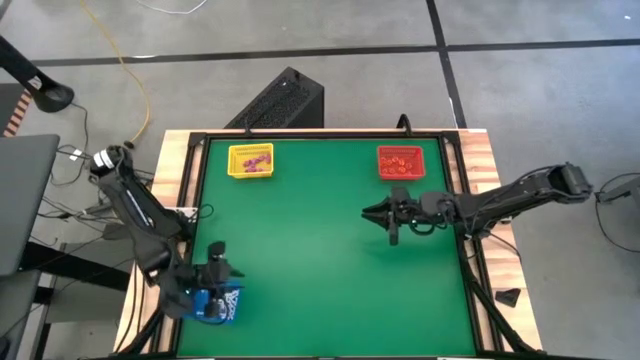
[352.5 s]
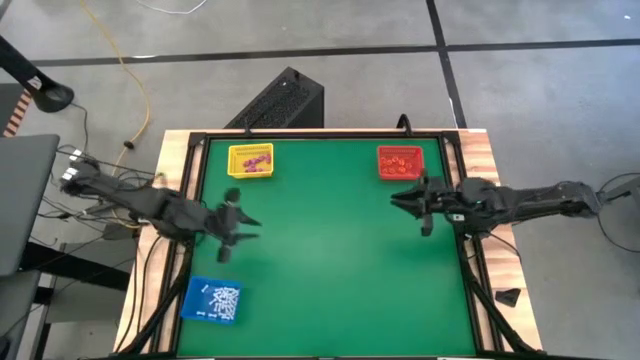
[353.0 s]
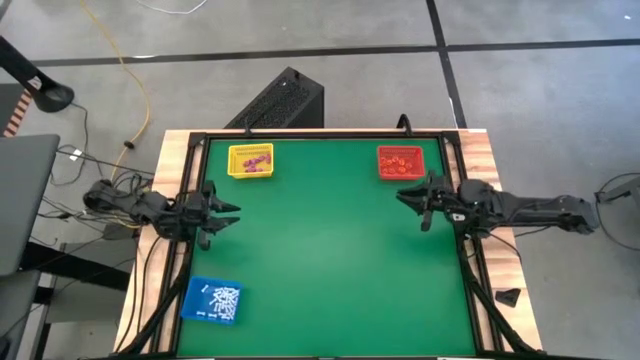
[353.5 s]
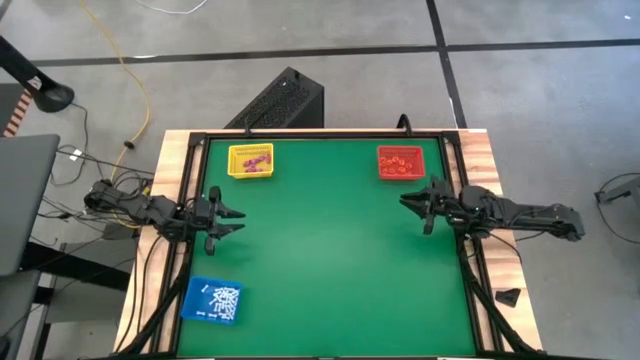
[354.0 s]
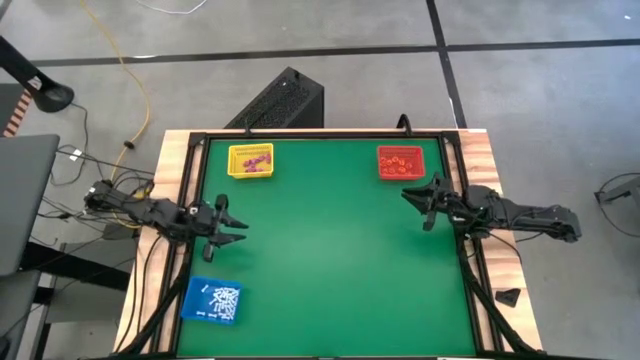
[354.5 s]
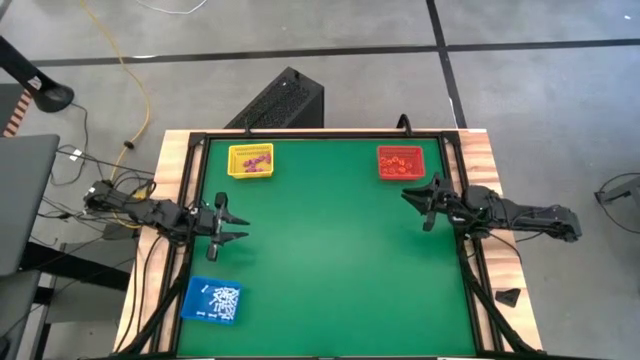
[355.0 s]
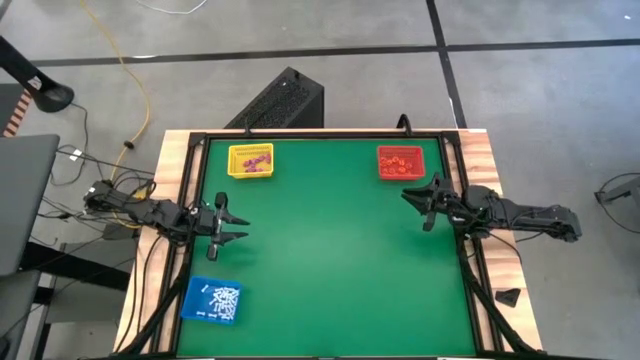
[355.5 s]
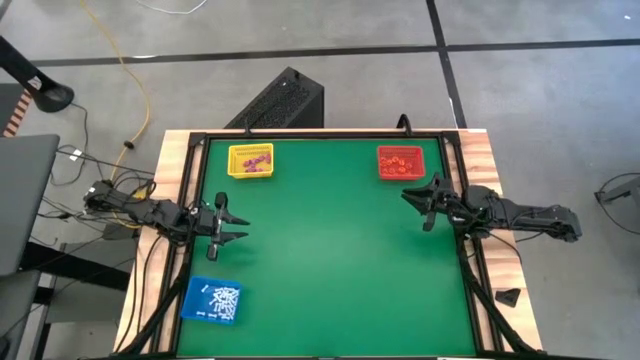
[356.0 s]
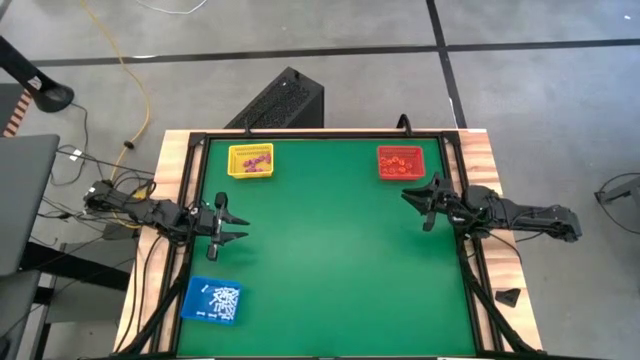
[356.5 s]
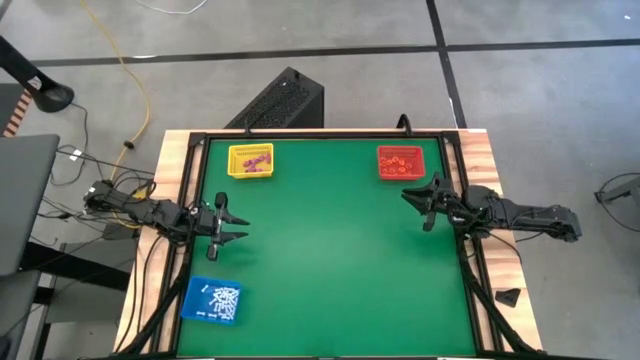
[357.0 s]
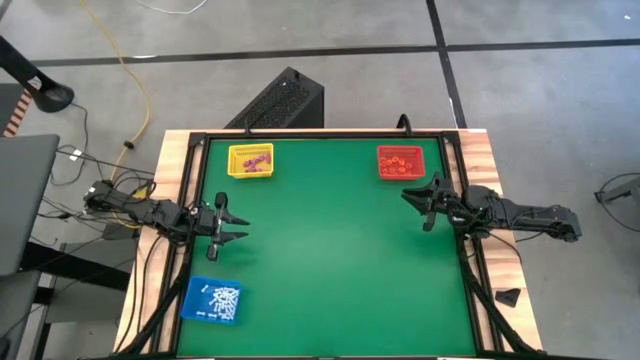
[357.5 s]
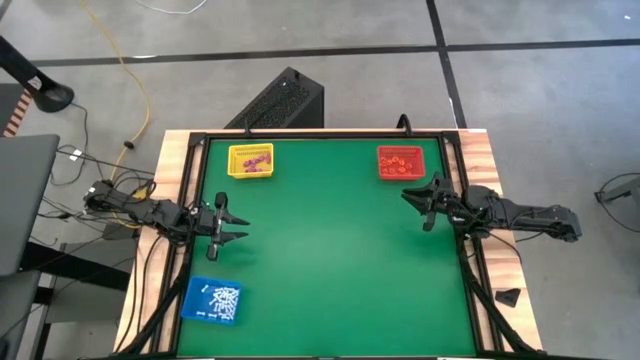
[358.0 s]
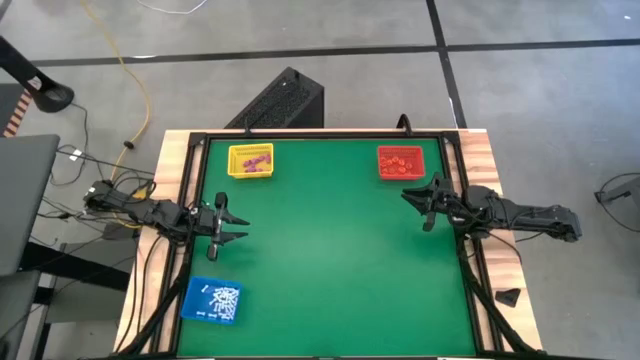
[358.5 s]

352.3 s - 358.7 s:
Task: Sort Halloween decoration
Return to Home Position

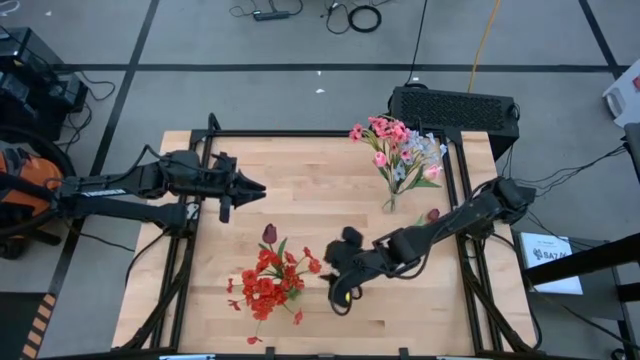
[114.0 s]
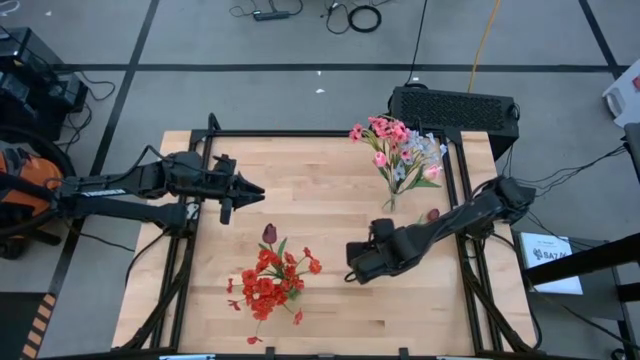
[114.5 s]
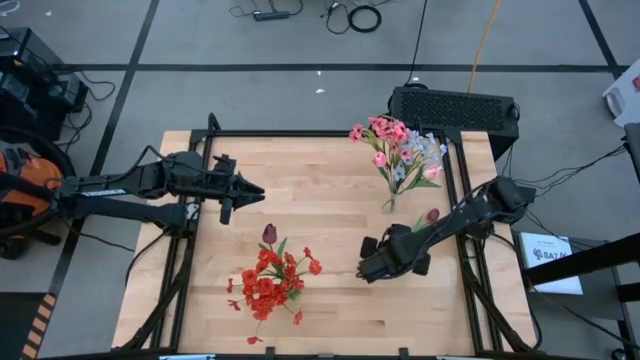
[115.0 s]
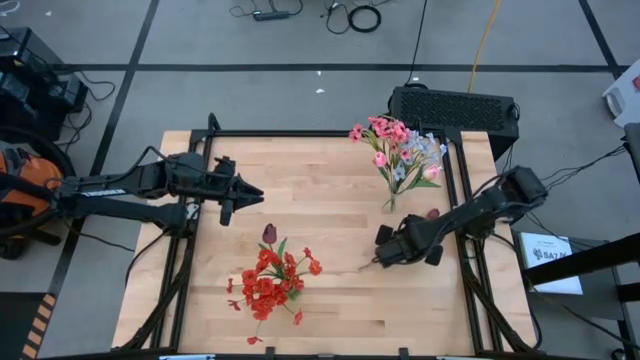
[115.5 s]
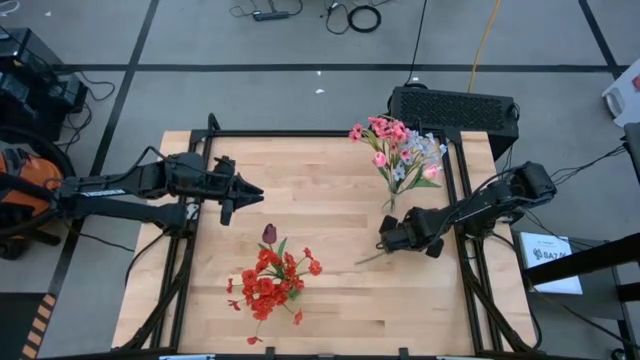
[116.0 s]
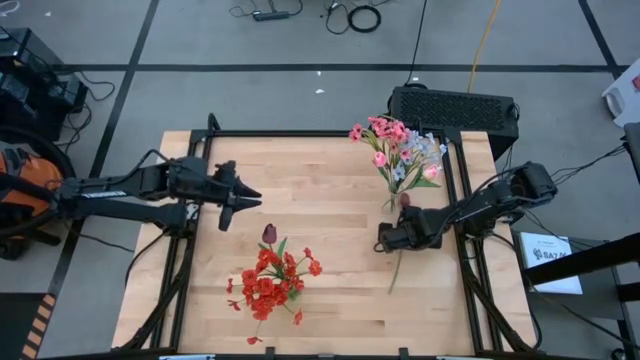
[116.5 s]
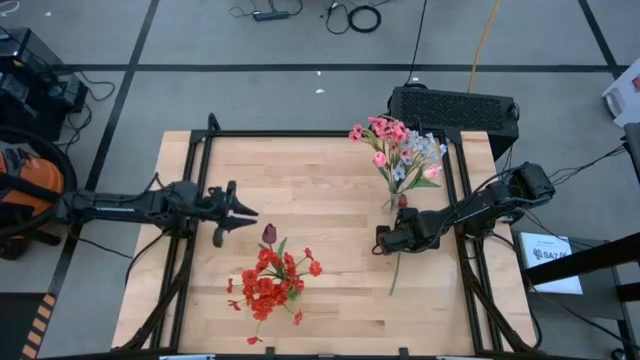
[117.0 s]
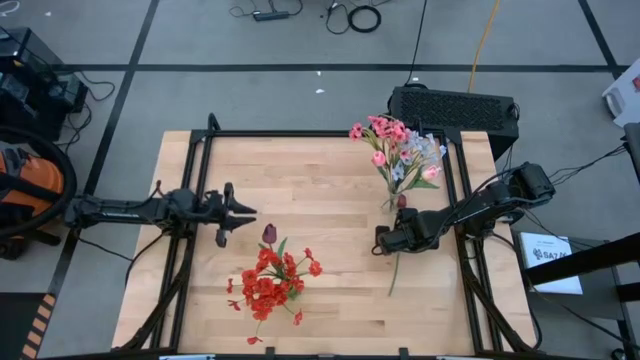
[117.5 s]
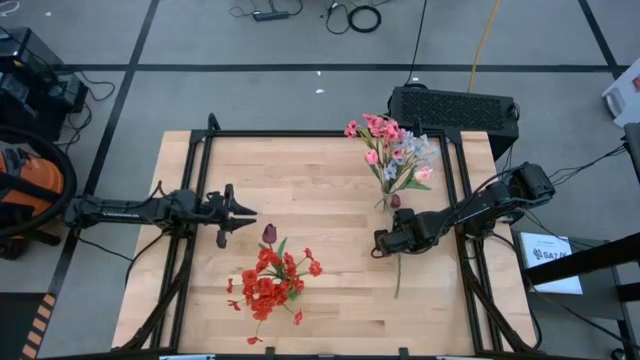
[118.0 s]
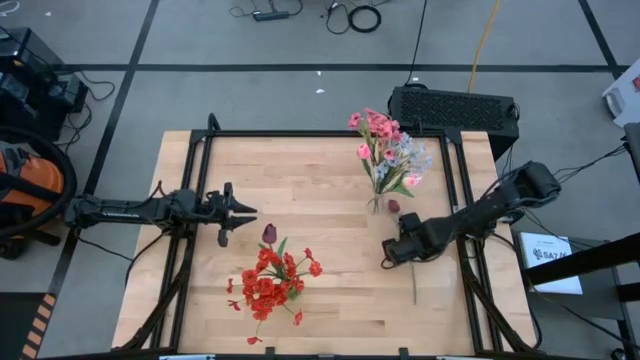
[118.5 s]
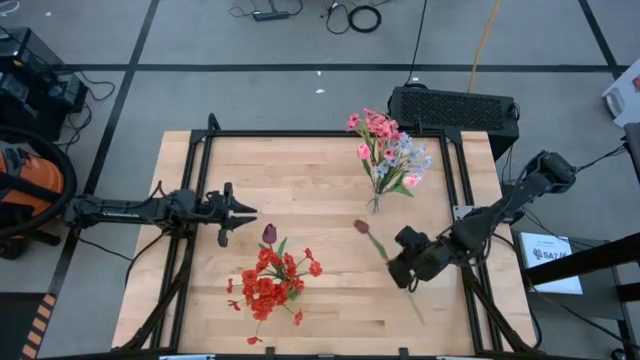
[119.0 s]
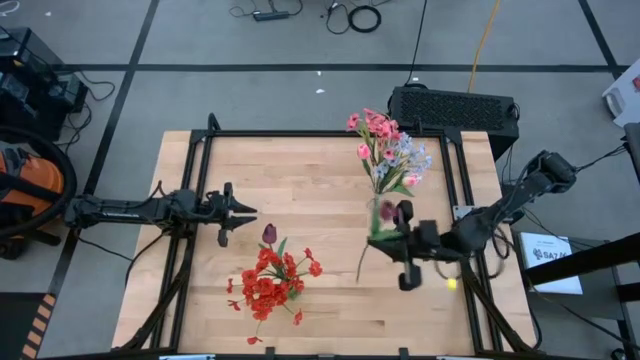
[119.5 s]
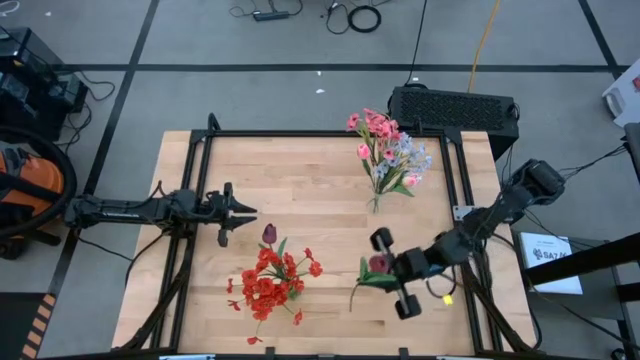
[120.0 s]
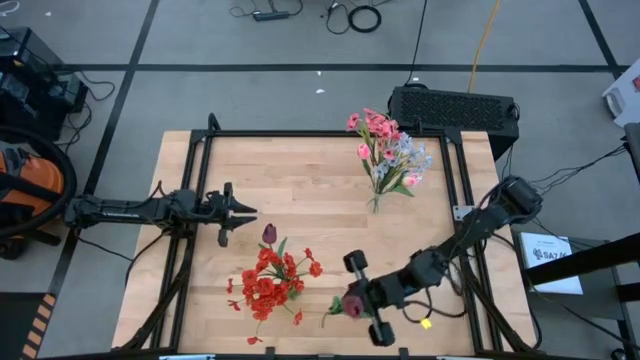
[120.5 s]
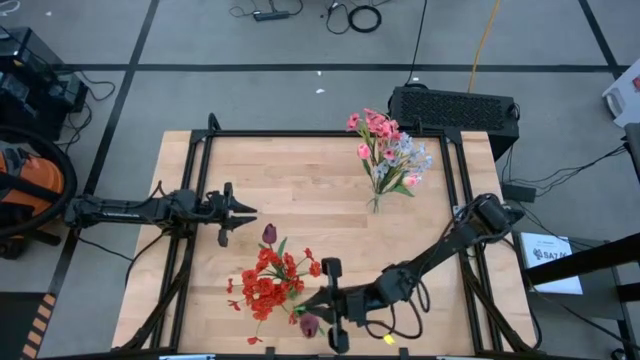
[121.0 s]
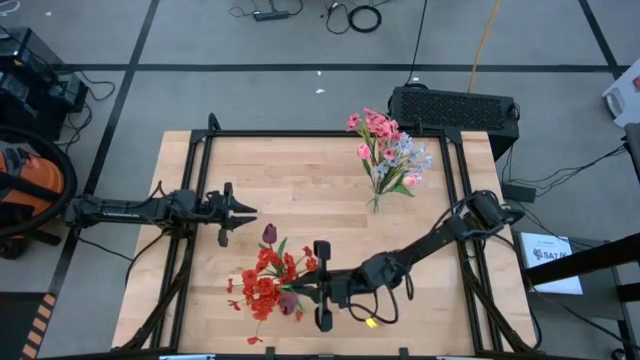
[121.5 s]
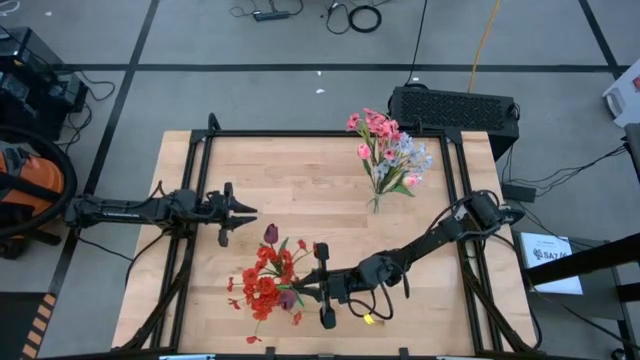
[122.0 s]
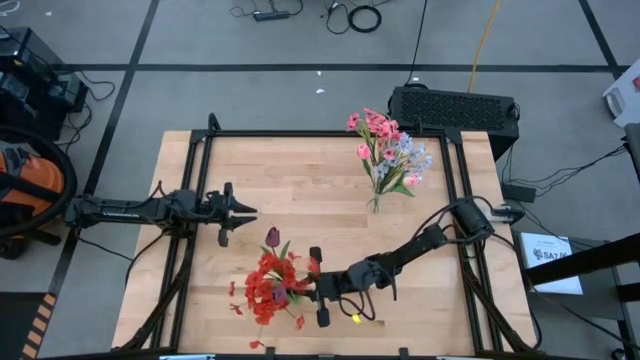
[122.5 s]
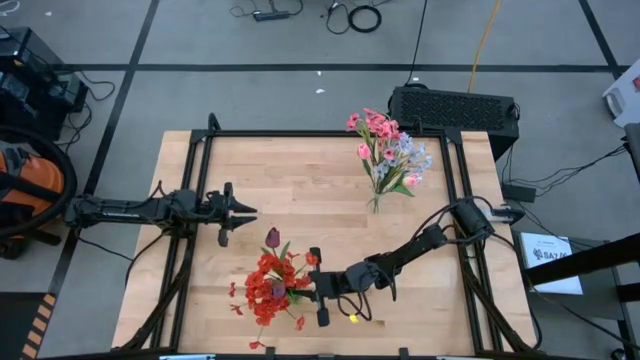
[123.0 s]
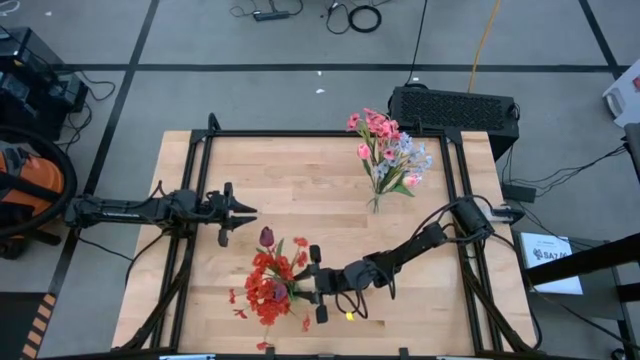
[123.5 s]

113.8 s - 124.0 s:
Task: Sort flowers into vase by color
Put the dark red flower into the green vase

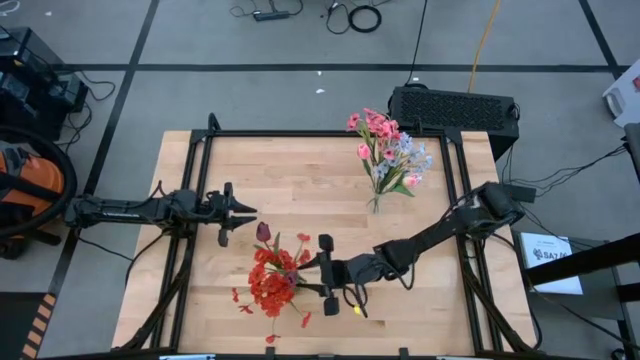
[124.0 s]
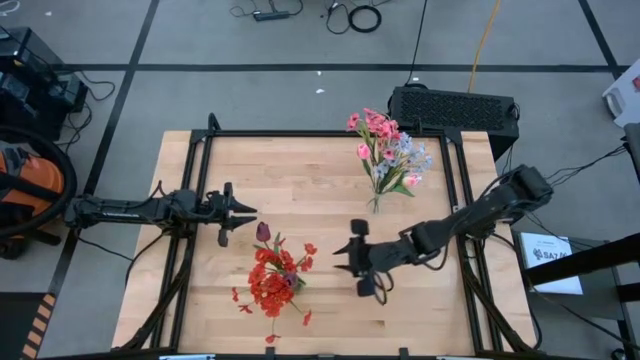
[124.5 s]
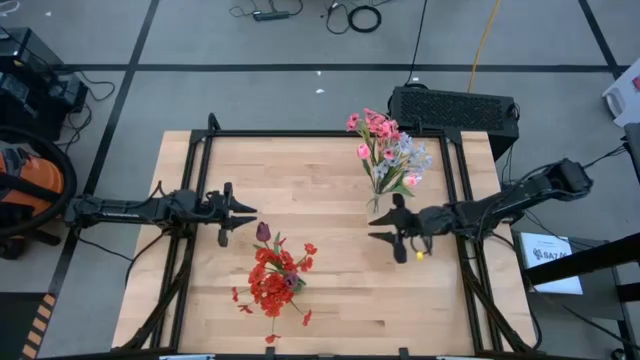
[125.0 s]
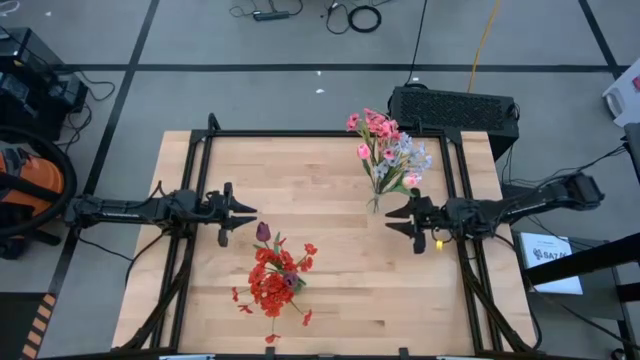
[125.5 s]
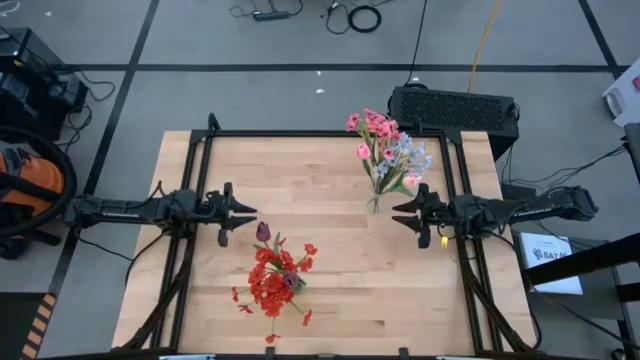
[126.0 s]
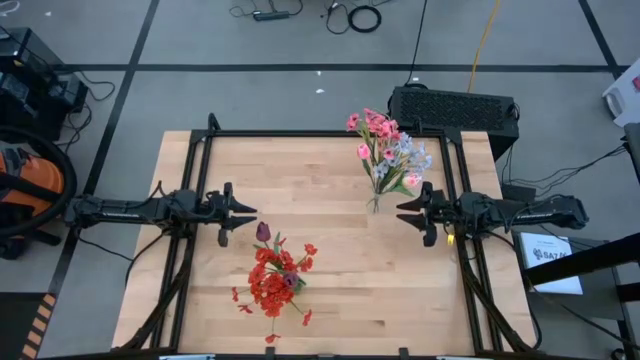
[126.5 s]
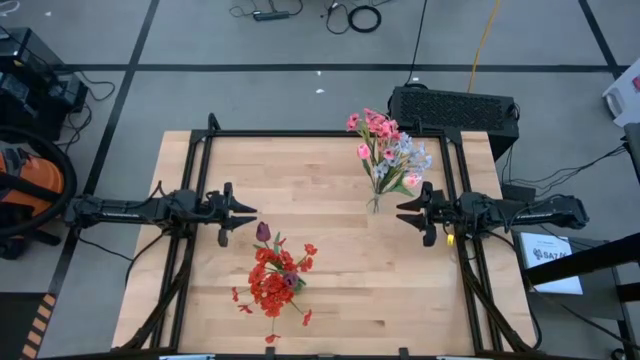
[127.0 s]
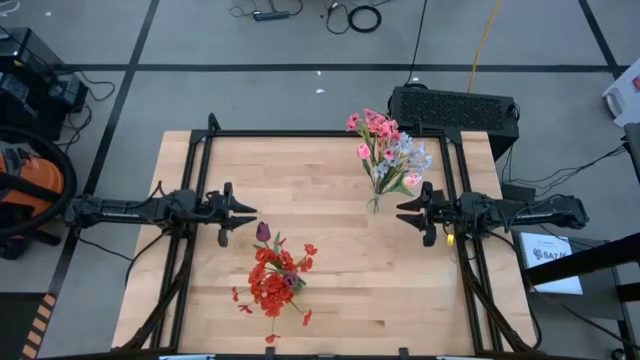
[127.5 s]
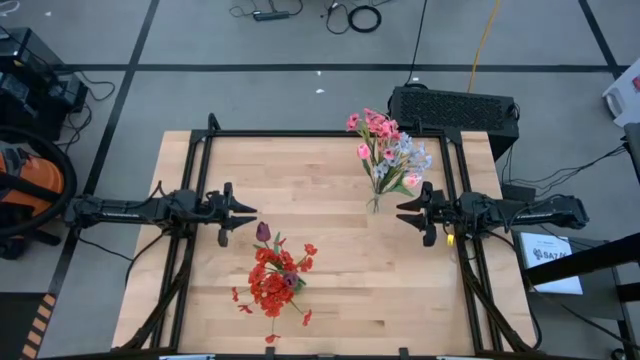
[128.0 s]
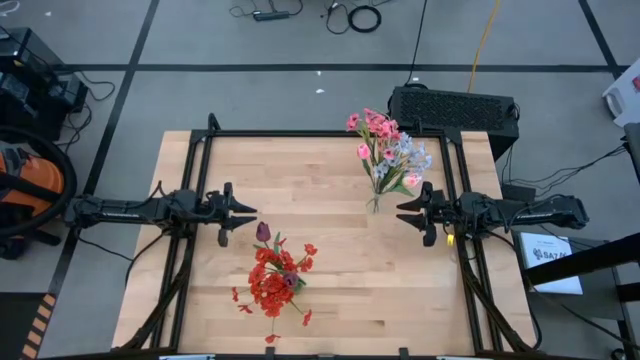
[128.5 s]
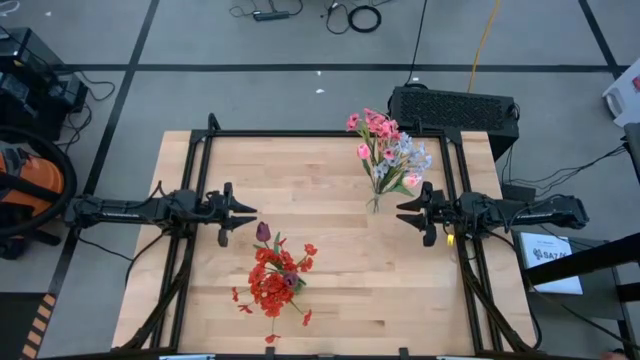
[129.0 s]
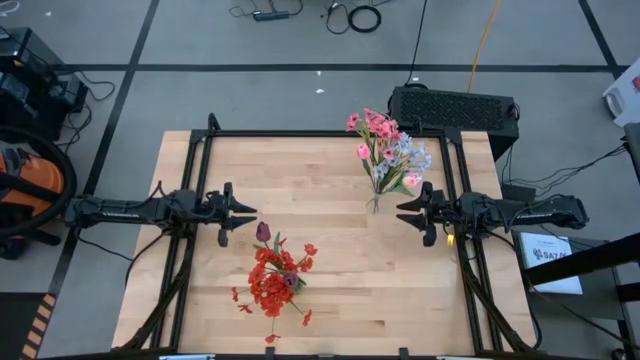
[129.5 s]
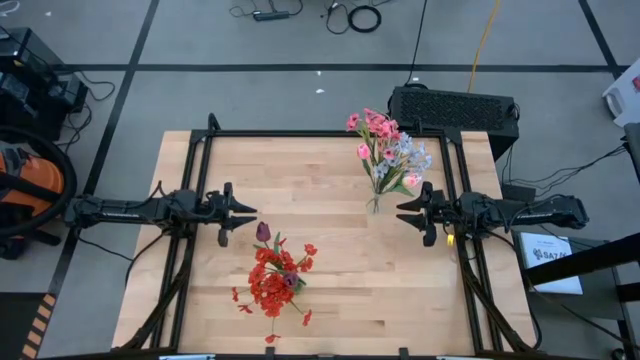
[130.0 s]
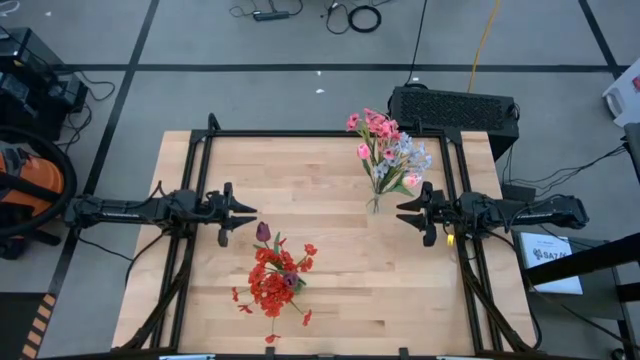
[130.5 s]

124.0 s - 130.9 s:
Return to Home Position
